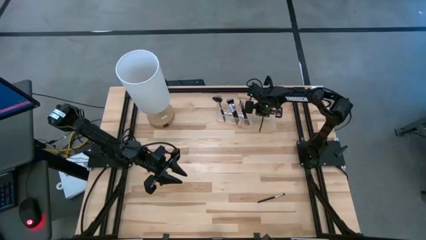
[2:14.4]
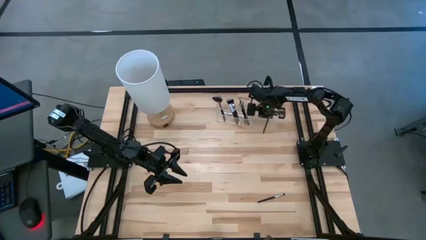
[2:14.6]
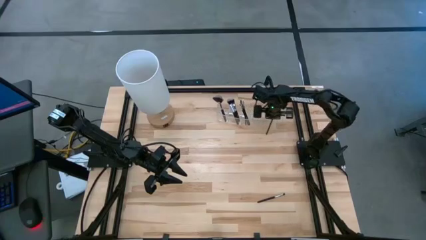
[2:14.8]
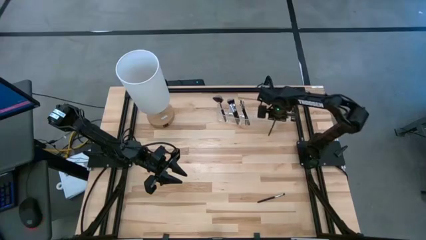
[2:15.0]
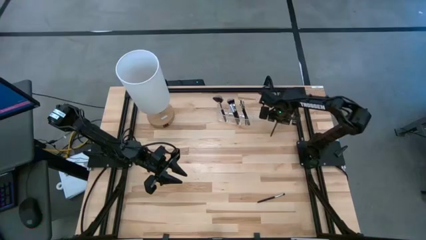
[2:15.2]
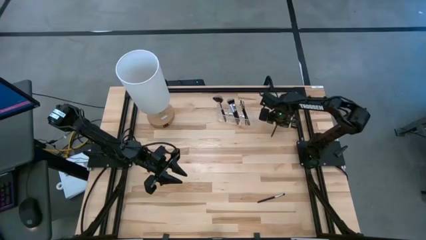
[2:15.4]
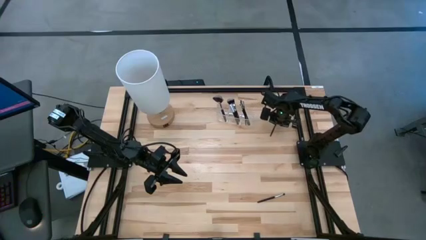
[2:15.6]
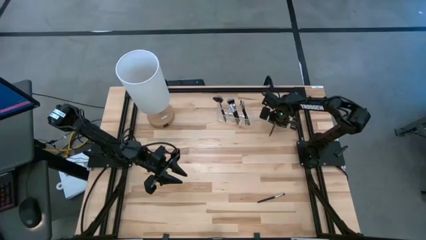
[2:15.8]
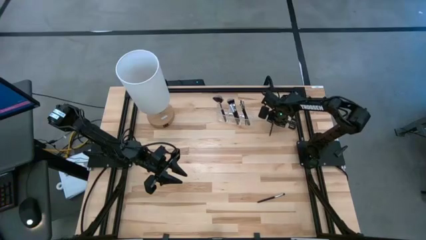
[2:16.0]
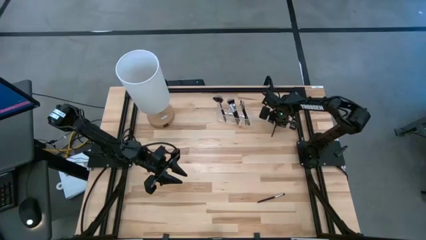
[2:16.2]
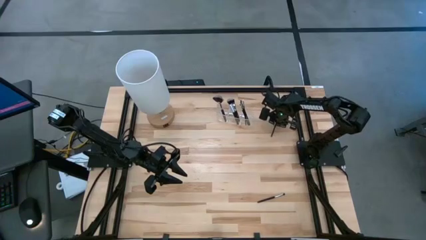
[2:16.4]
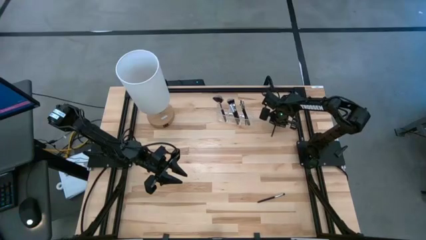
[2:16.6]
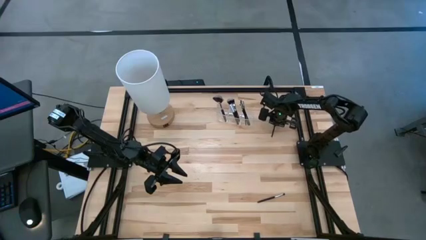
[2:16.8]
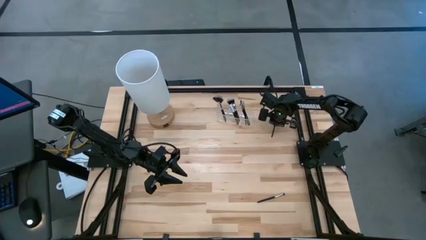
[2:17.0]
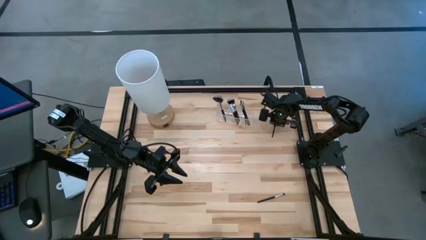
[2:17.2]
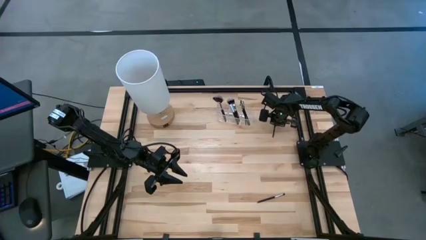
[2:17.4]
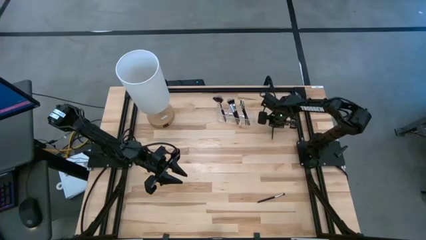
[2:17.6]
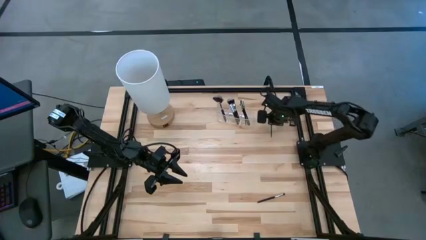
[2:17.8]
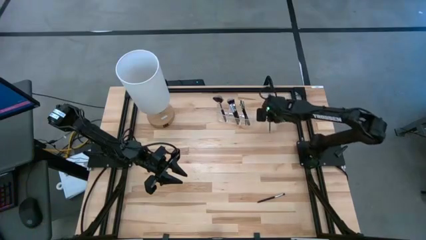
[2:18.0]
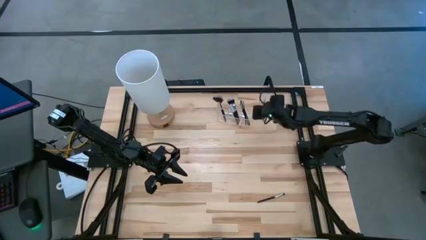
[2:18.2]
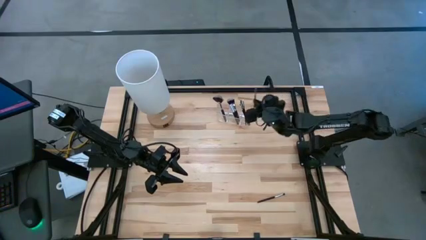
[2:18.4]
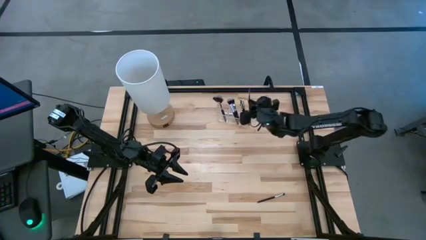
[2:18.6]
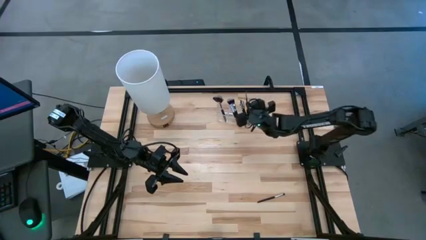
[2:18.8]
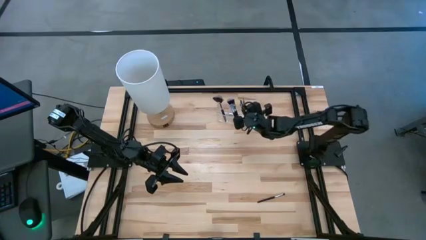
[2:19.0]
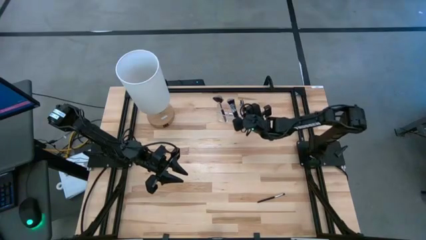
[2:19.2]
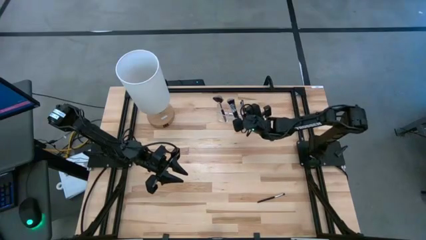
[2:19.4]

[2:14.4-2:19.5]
Task: Put items in baskets/containers
Put the black liner brush into the transparent organizer

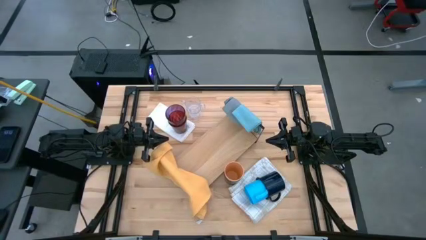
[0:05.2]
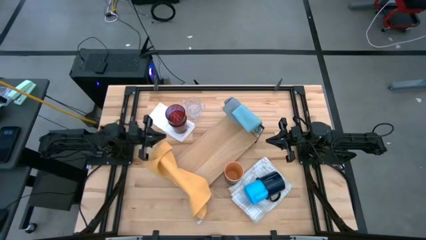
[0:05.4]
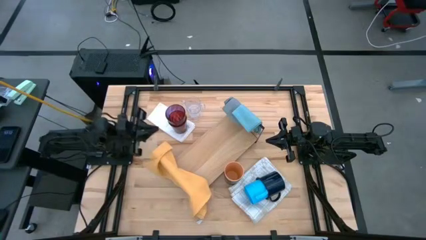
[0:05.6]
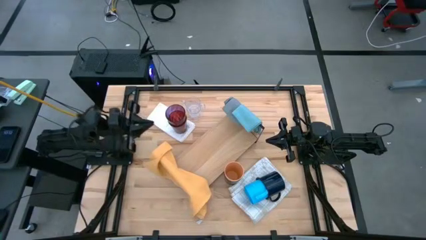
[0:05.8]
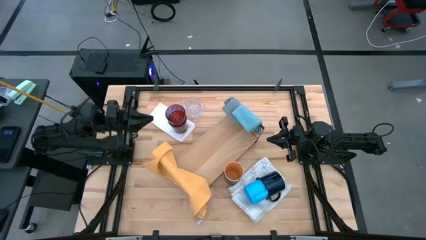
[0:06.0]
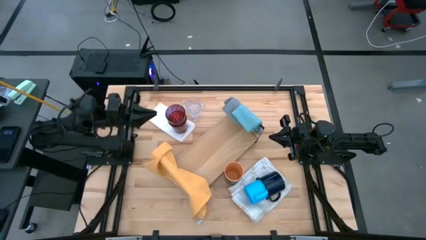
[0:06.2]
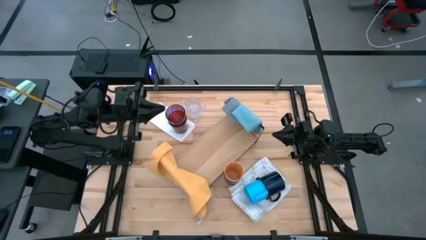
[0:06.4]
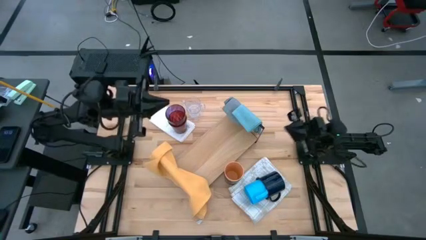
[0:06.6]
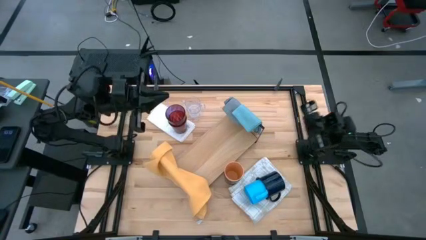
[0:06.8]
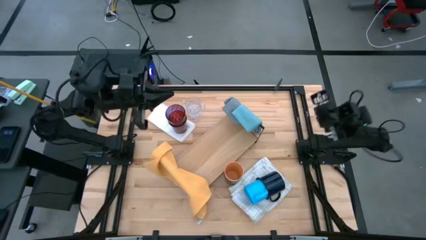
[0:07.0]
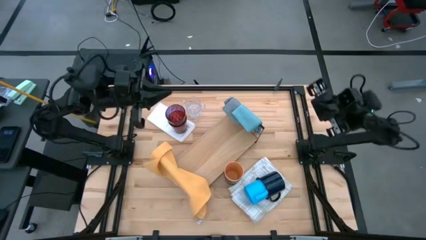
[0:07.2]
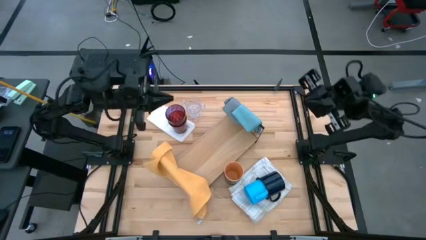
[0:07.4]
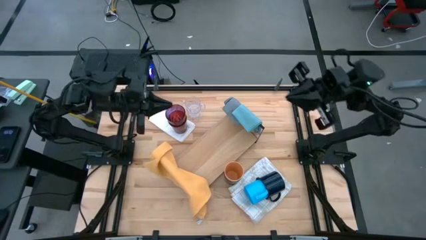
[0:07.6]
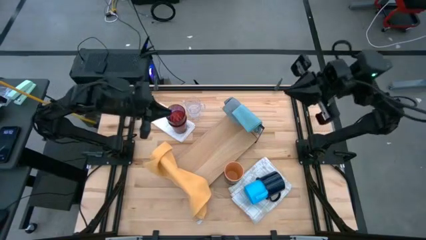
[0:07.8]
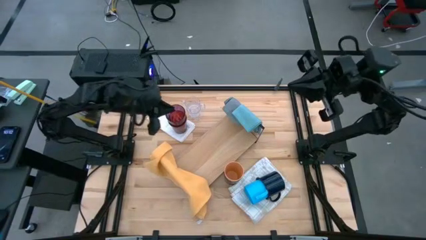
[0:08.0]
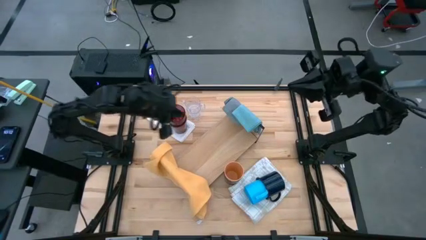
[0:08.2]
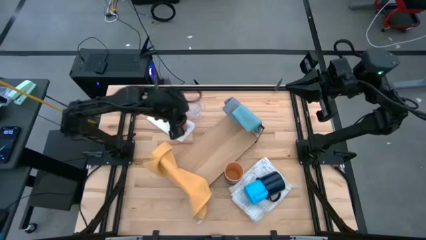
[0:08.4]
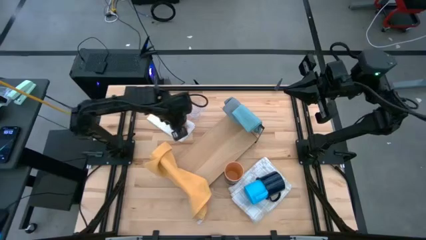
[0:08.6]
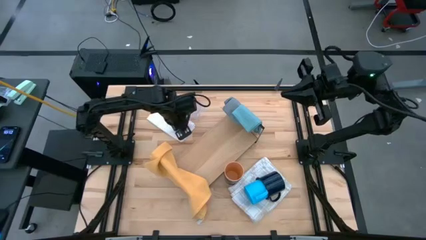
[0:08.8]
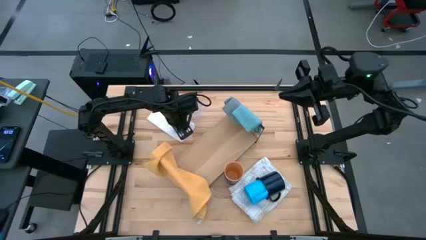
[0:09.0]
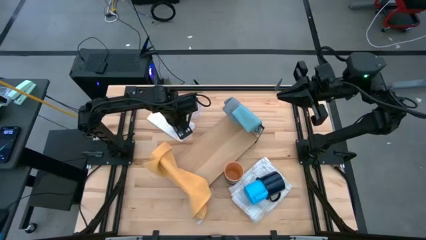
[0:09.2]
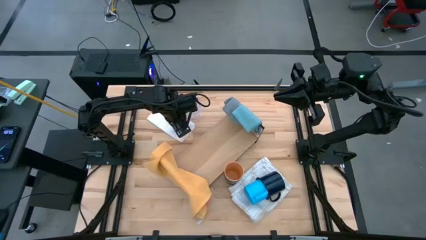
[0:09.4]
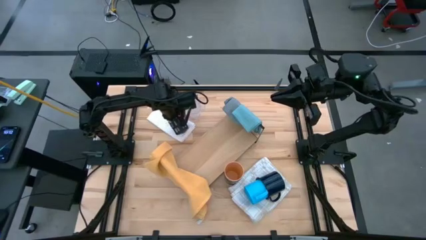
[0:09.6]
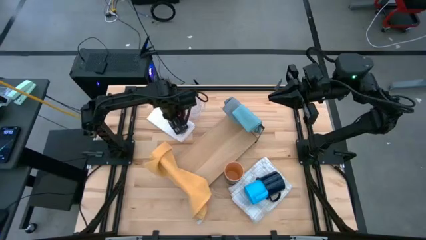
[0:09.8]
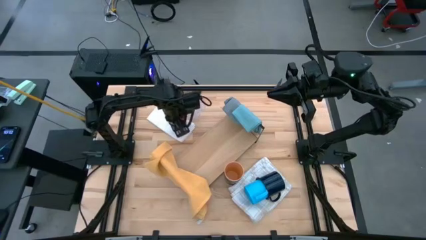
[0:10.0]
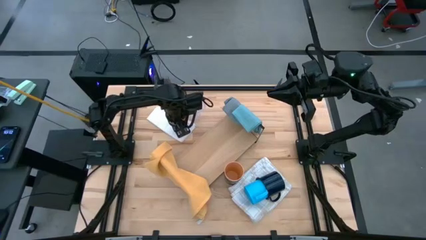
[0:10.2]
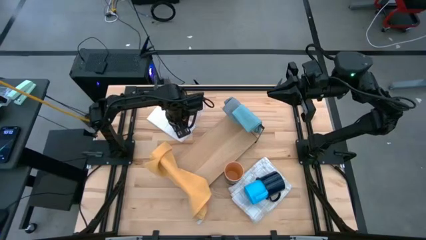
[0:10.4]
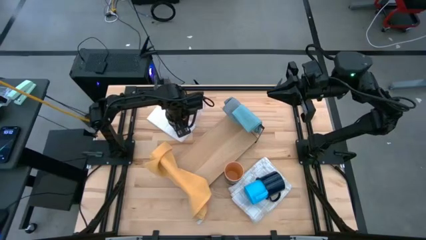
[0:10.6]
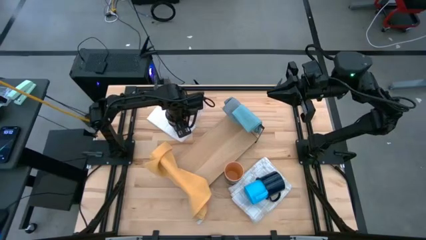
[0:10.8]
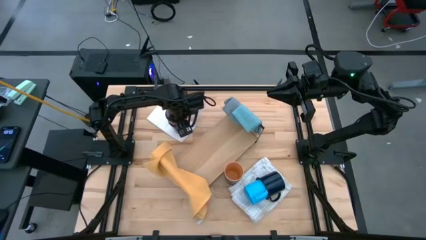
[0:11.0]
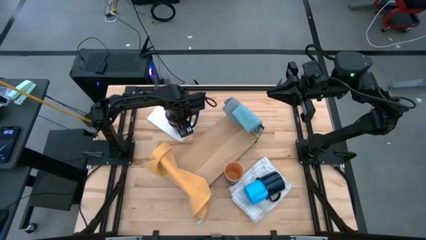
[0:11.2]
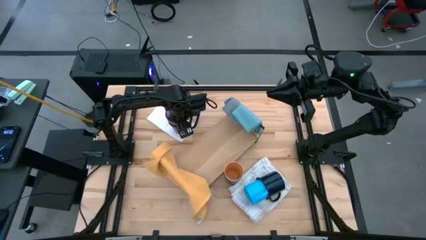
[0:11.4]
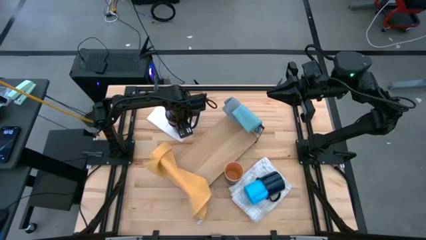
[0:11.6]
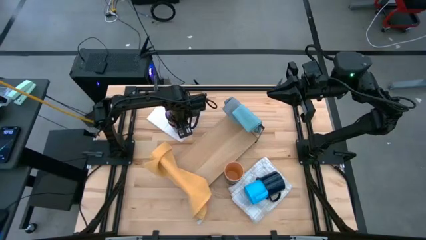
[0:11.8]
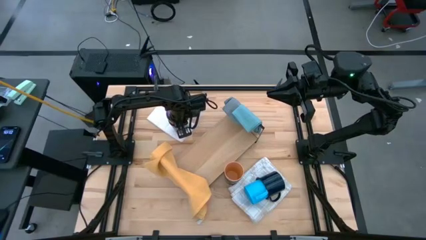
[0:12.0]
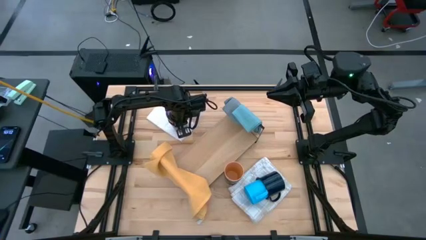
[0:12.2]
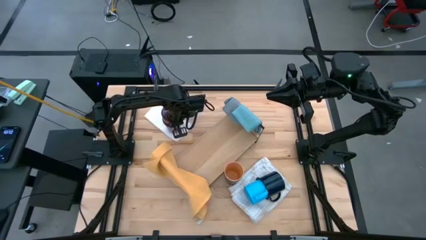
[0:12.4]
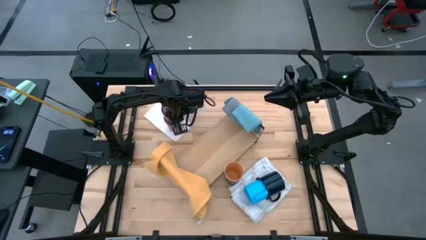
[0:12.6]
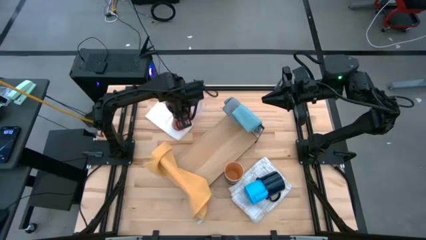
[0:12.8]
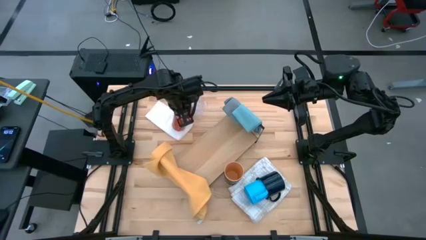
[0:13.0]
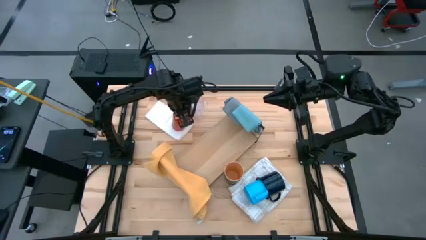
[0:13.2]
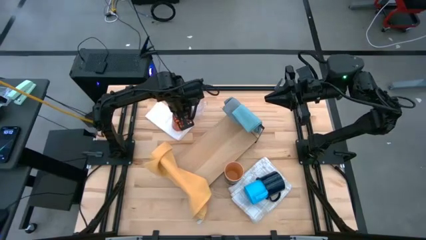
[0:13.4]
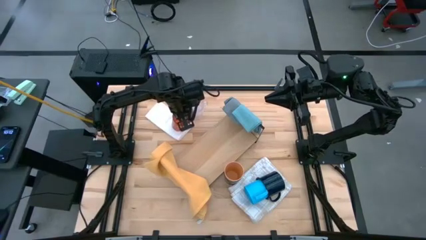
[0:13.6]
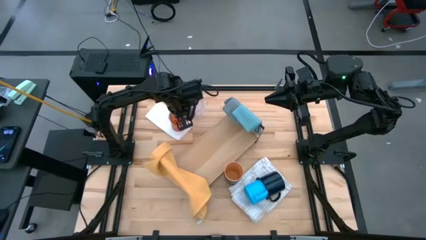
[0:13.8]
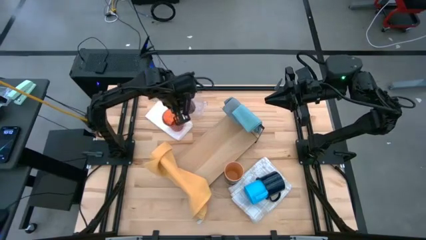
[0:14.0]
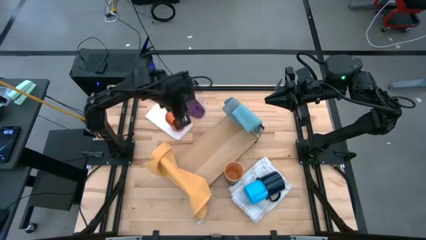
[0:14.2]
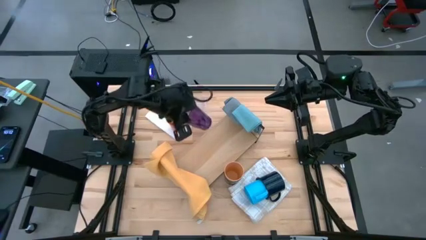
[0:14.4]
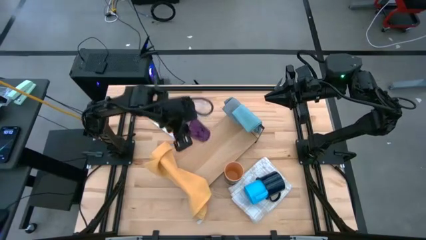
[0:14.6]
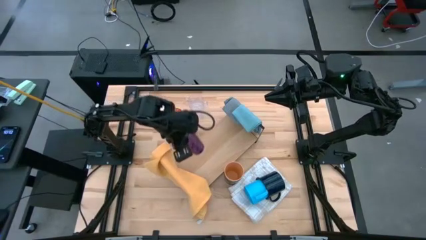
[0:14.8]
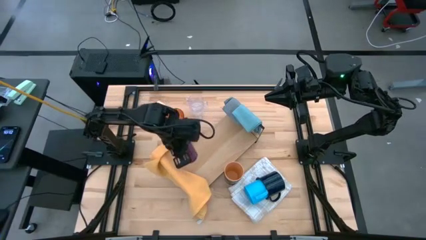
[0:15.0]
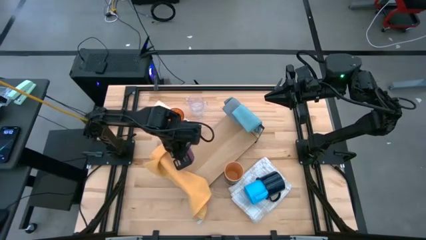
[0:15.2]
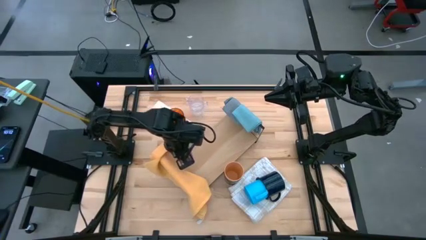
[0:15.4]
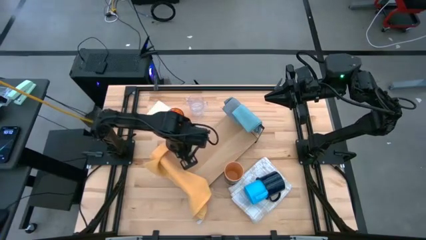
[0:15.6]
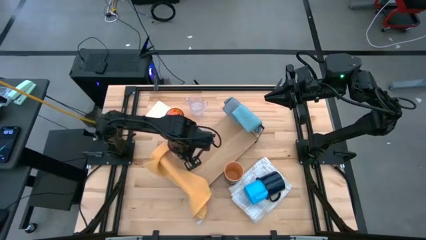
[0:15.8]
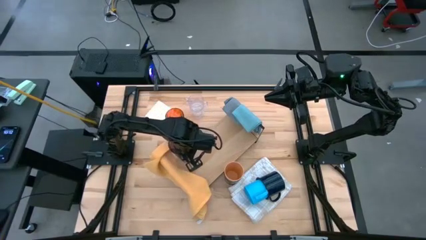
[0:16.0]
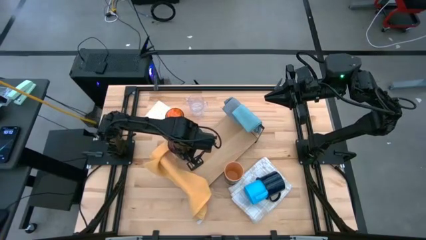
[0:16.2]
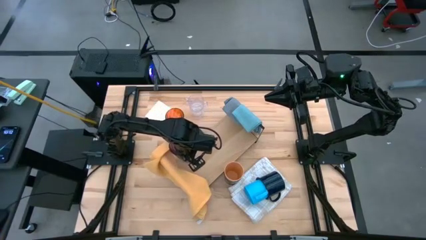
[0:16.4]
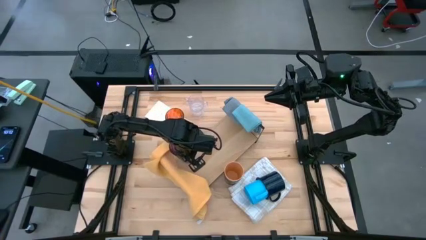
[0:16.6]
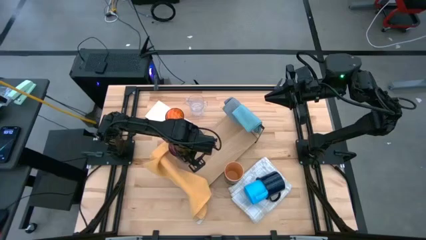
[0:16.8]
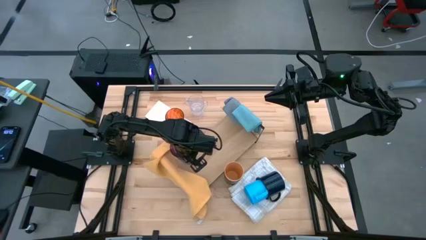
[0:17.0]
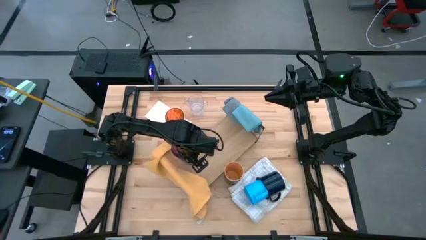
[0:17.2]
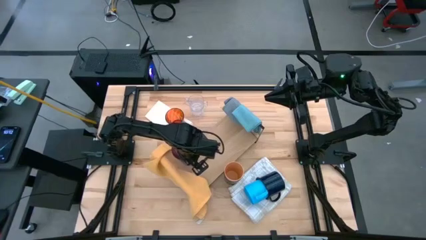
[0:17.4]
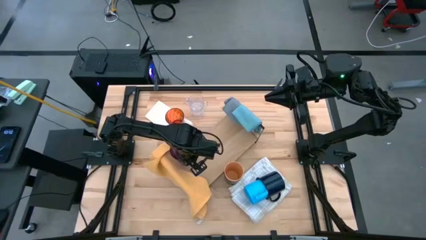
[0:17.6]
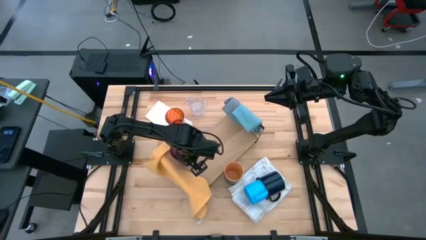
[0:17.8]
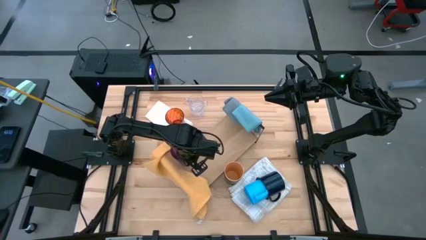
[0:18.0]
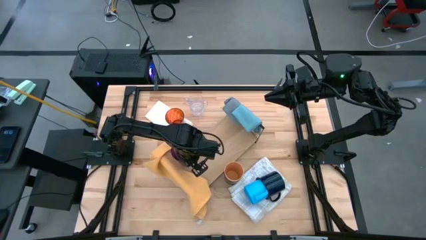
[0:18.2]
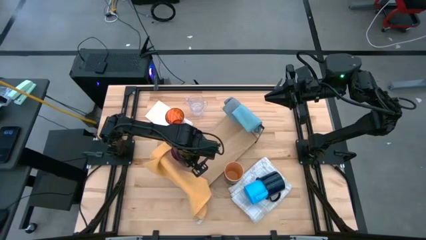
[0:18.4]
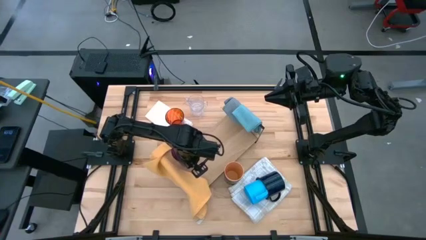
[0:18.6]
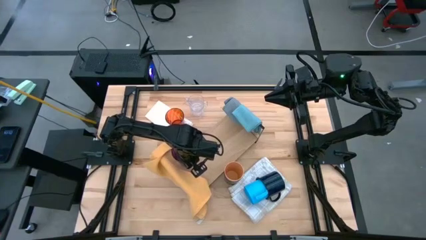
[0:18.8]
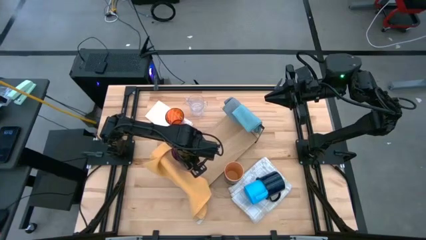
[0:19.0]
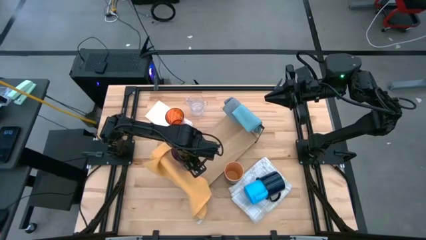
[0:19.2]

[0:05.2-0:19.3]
Task: Stack small to large cups/mugs on shelf
Put the purple cup on the shelf
